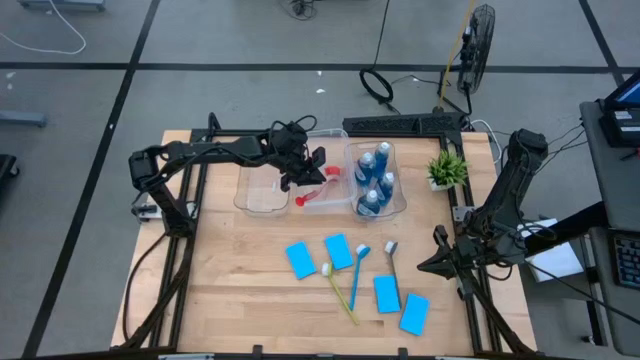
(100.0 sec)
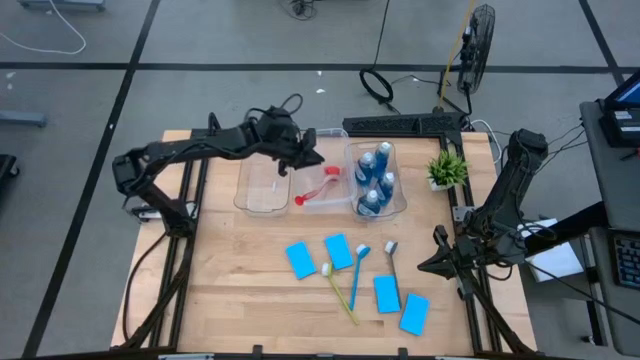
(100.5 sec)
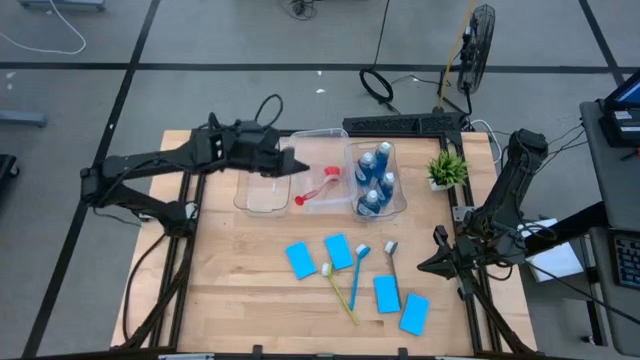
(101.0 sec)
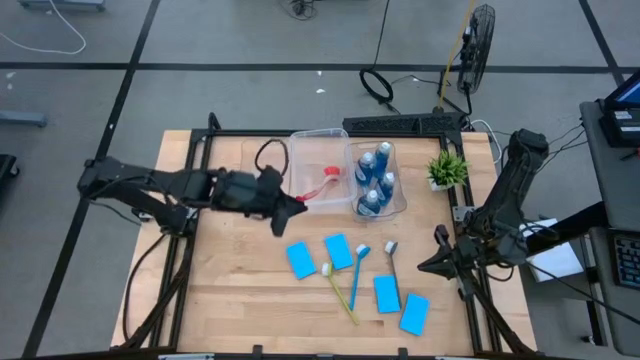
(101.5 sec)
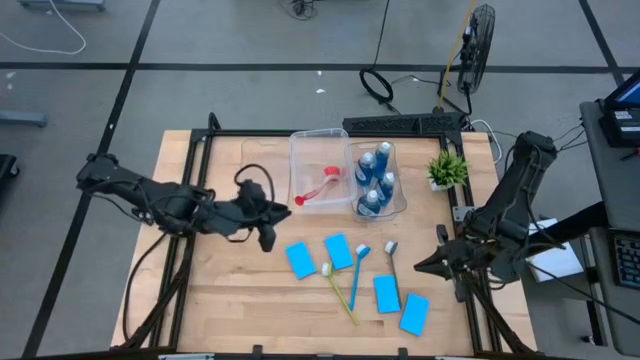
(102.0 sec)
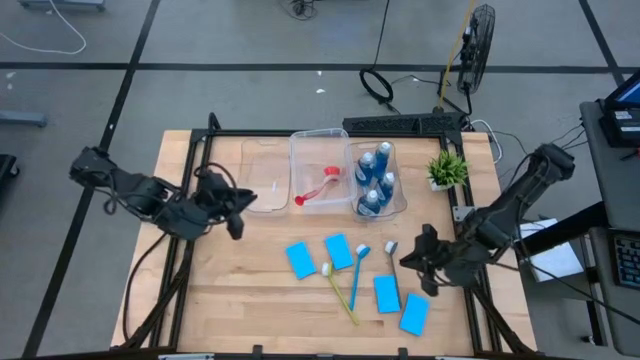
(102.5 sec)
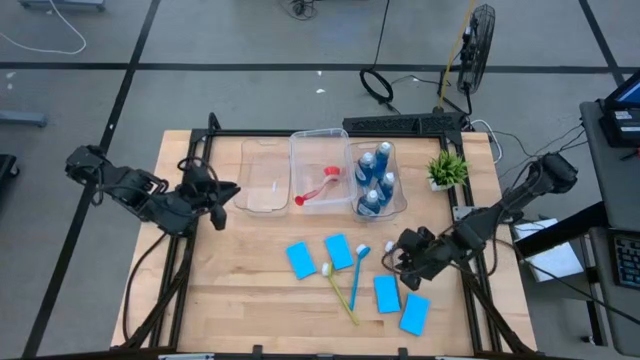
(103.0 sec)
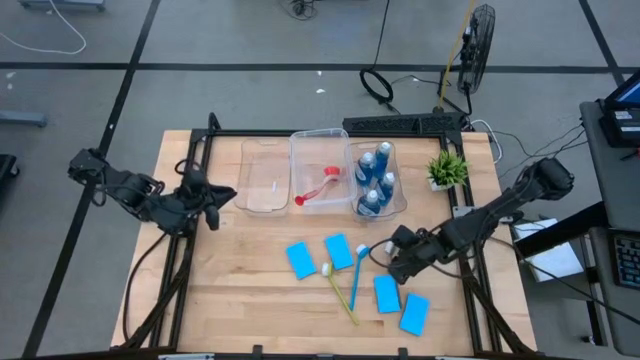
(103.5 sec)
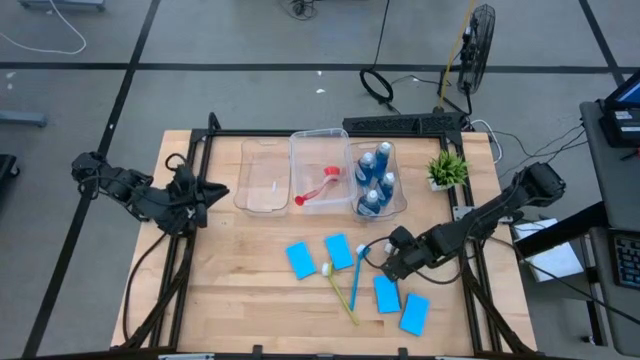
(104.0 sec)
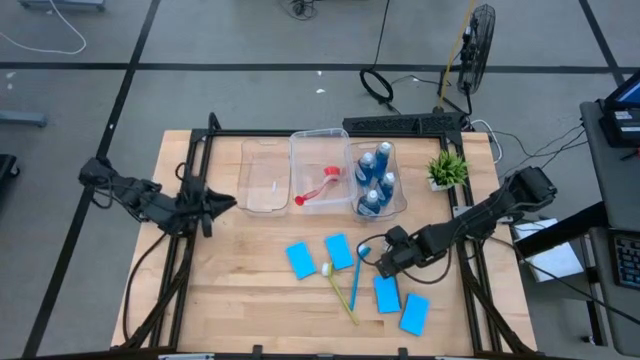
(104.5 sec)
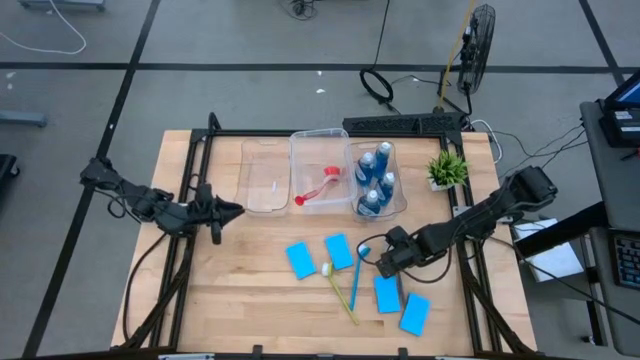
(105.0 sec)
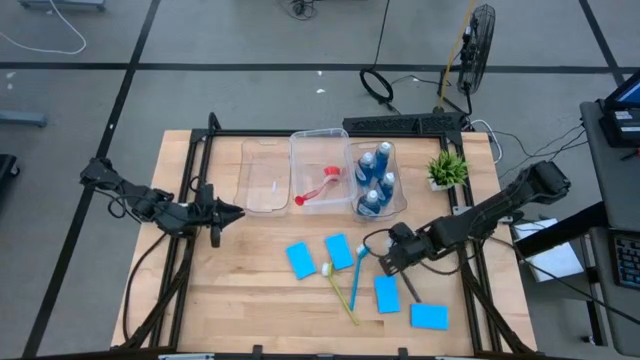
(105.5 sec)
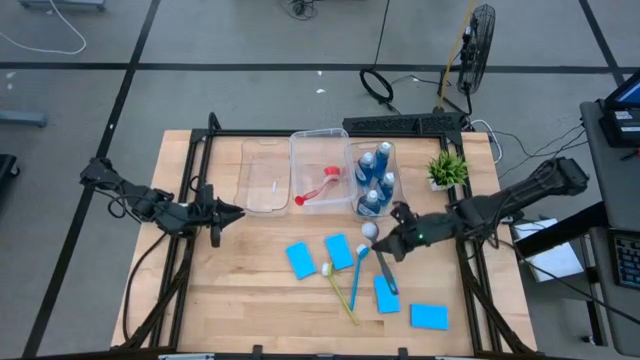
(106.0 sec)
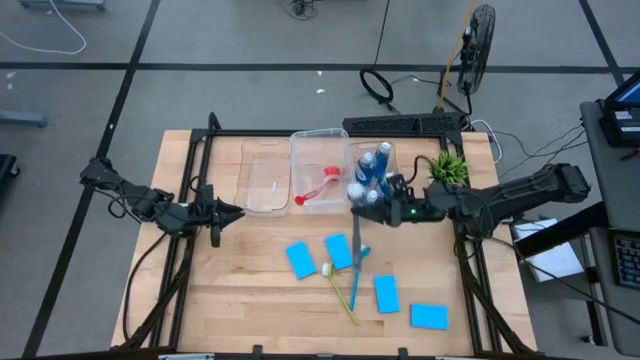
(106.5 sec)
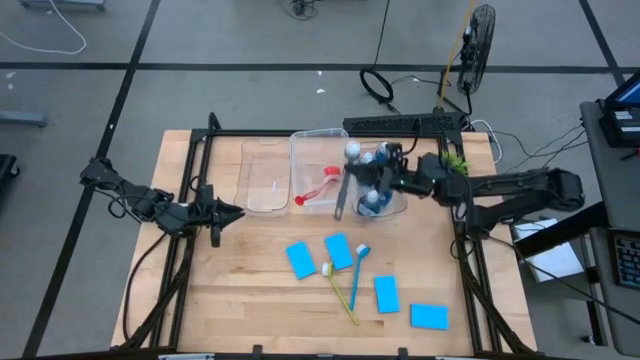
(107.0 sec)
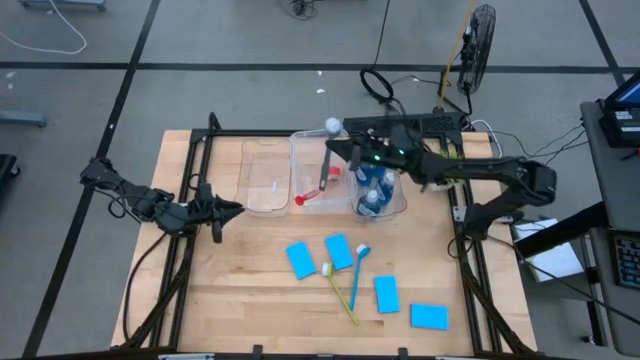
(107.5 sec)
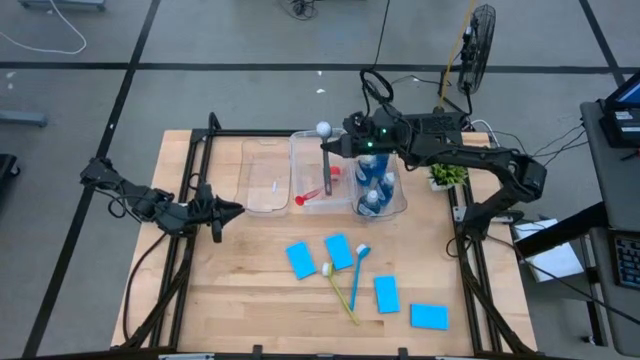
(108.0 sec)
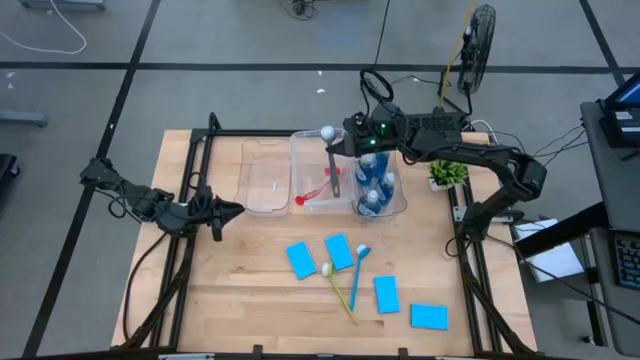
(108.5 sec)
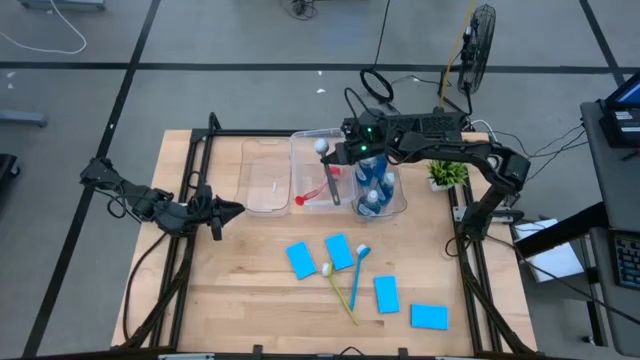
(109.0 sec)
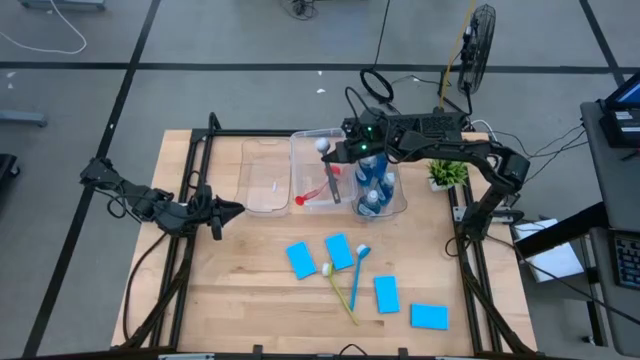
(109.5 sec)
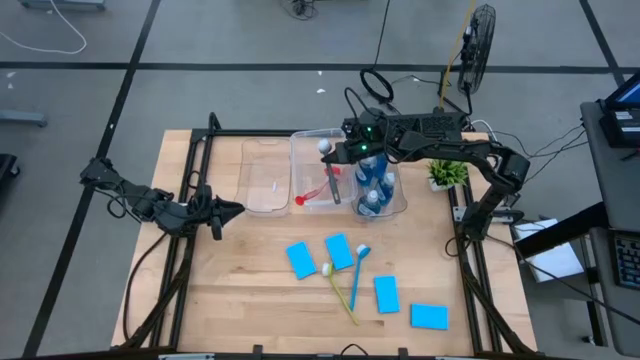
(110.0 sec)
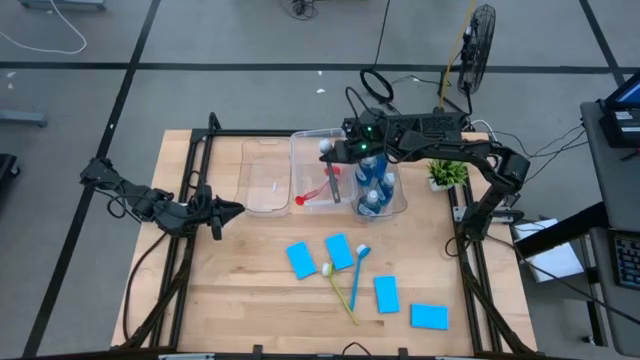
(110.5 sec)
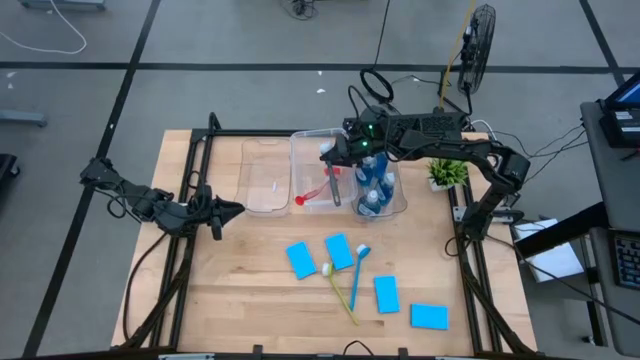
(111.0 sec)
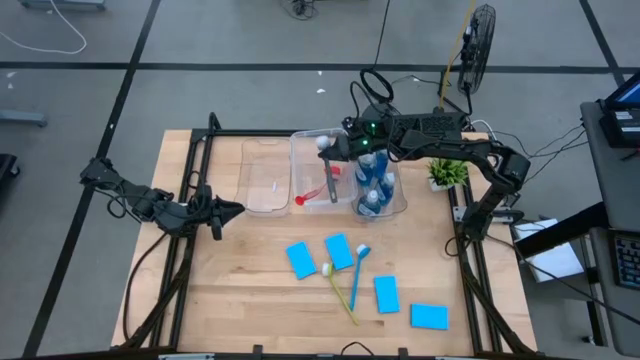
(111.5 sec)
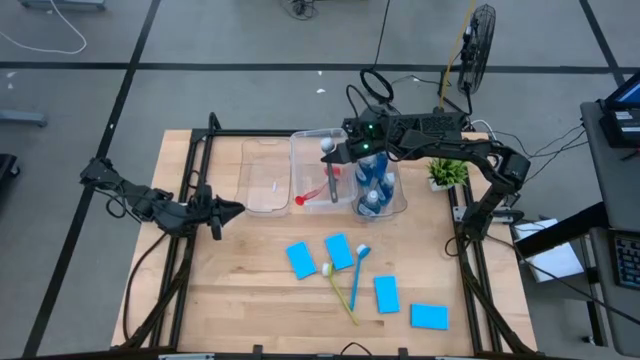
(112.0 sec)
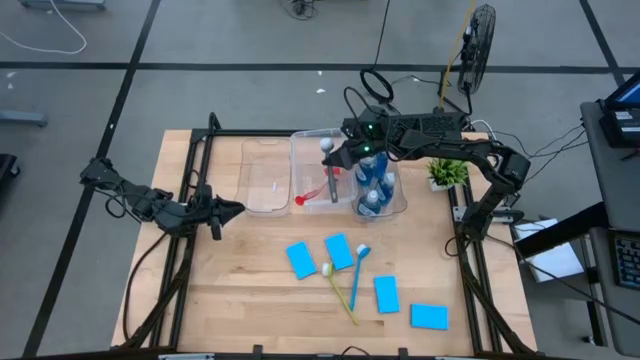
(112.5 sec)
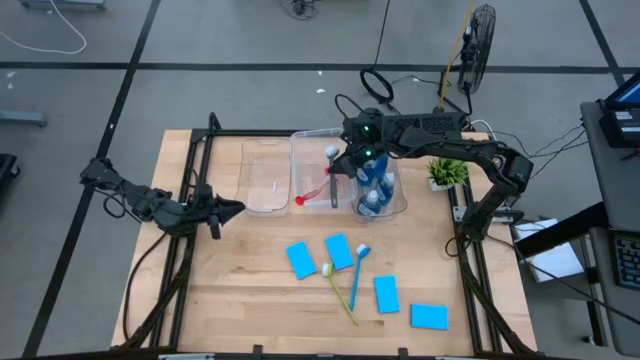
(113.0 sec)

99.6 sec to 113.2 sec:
Task: Pick & Place Kitchen Sink Supplies
Put the gray dishwashing brush into the white bin

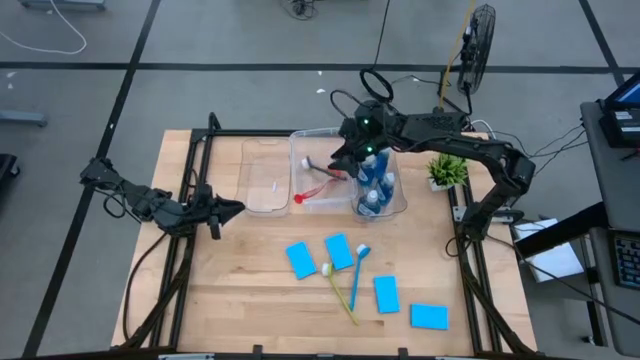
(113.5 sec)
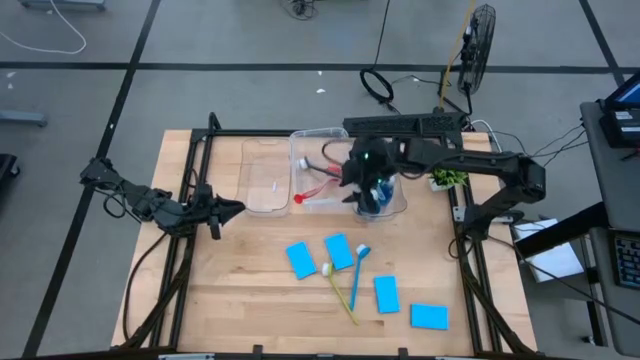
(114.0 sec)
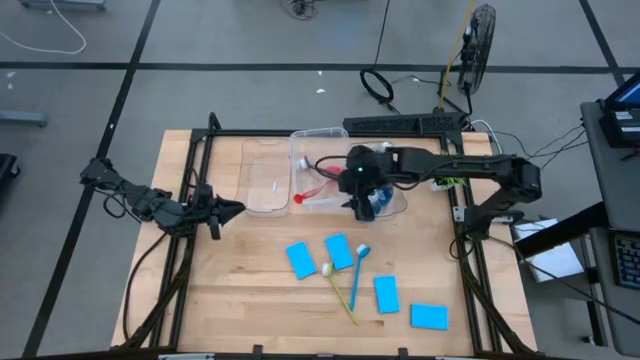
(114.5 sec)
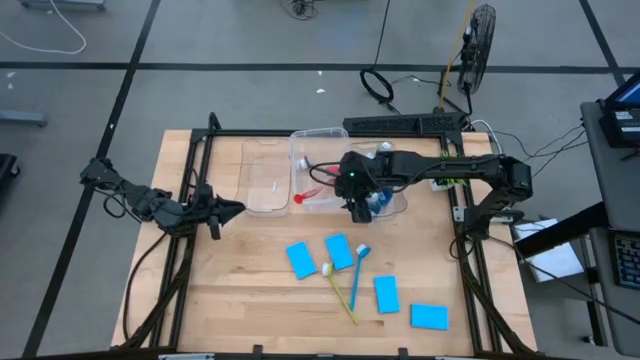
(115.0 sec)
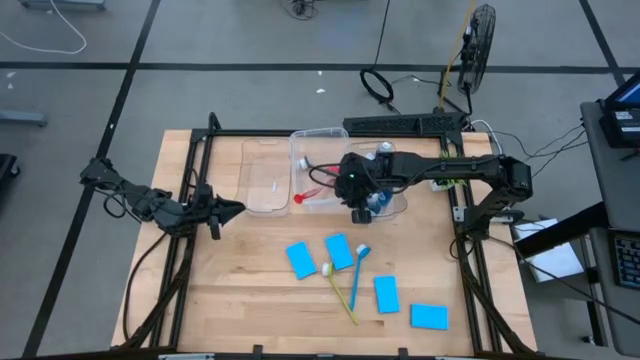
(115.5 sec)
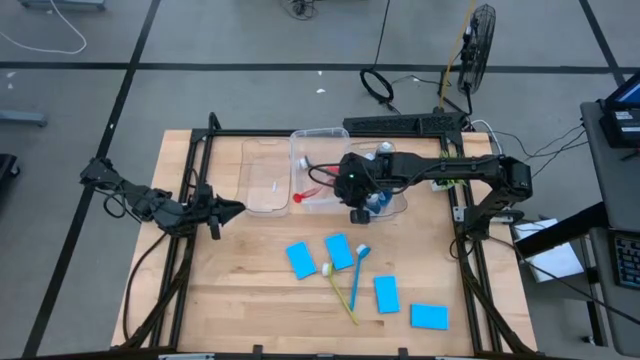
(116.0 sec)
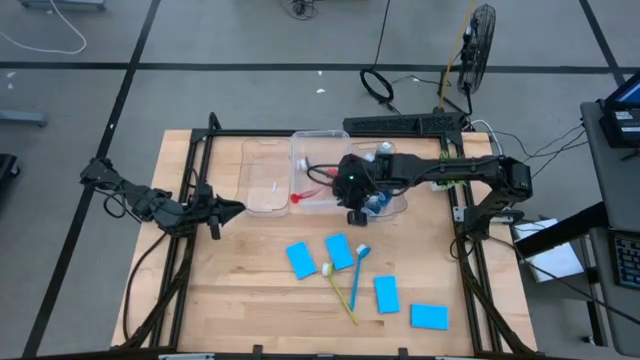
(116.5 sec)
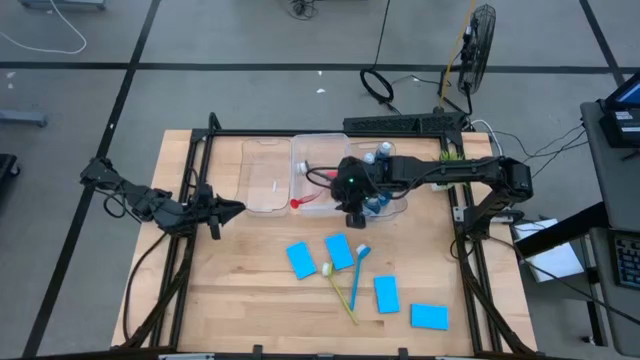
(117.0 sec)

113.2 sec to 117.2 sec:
Adjust the white bin

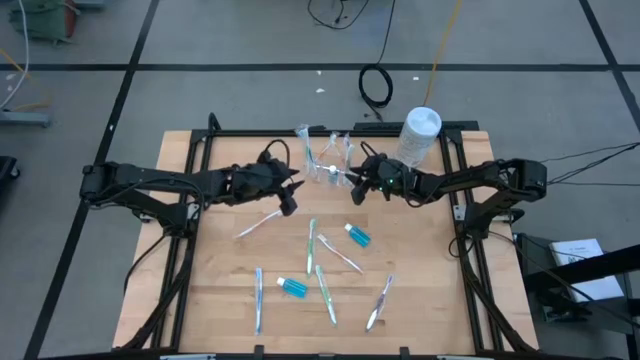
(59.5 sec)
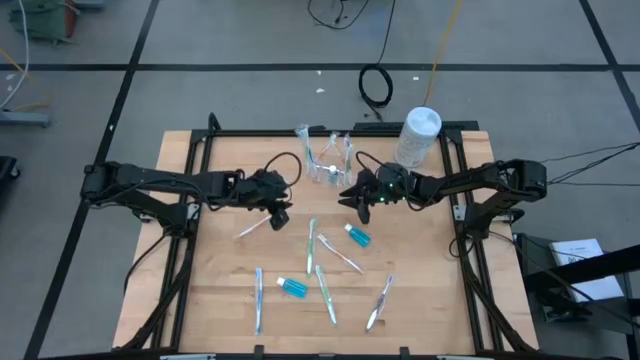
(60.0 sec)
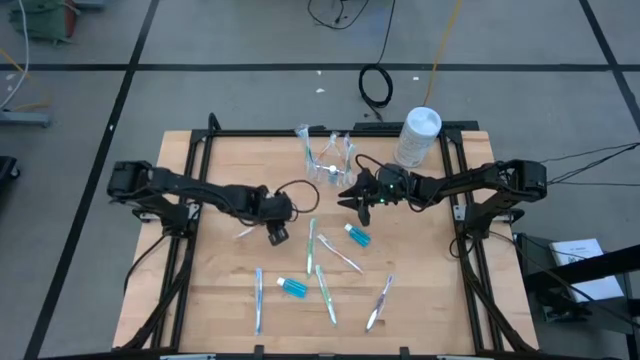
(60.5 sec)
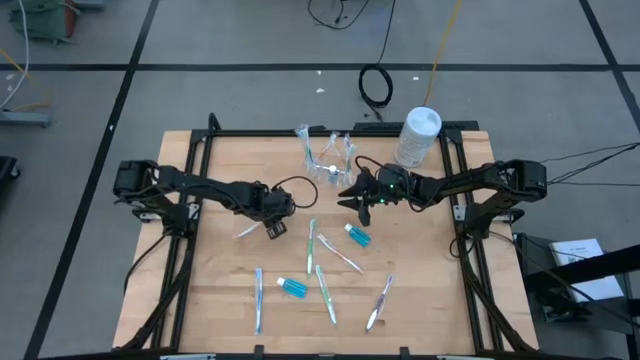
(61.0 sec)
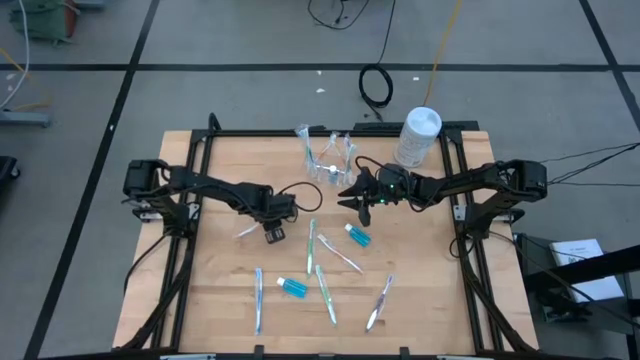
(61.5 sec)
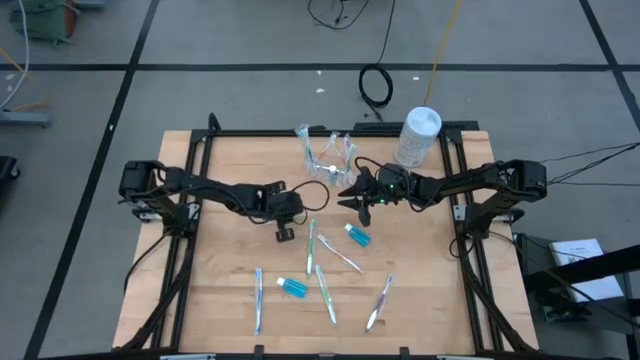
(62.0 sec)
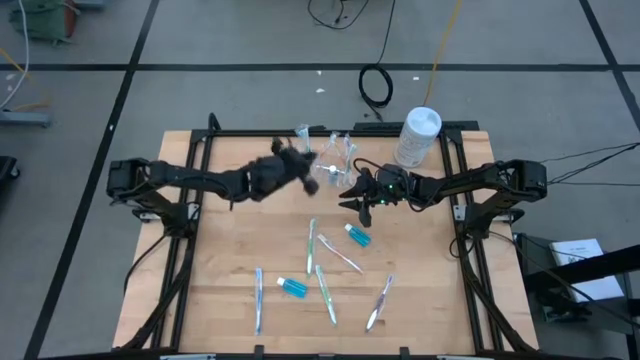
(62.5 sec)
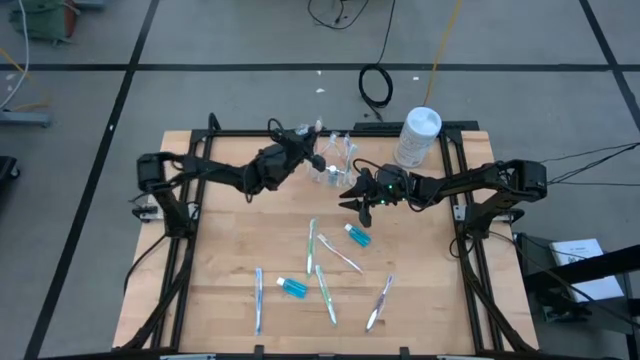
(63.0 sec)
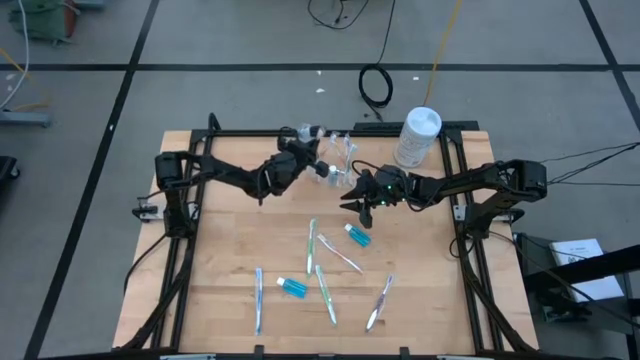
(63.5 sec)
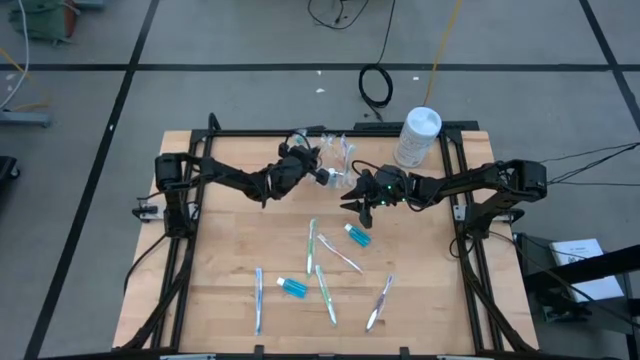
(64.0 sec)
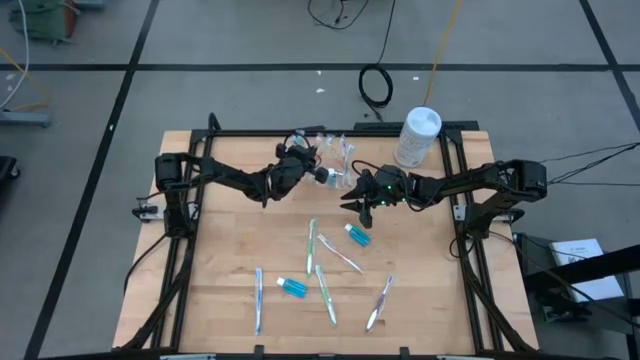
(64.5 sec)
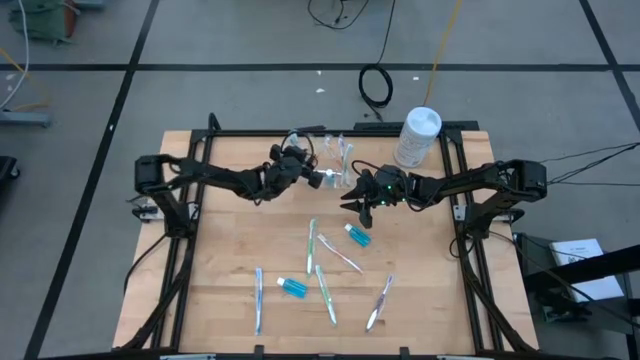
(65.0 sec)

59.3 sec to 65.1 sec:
Task: Pick & Place toothbrushing station
Put the orange toothbrush into the transparent organizer
